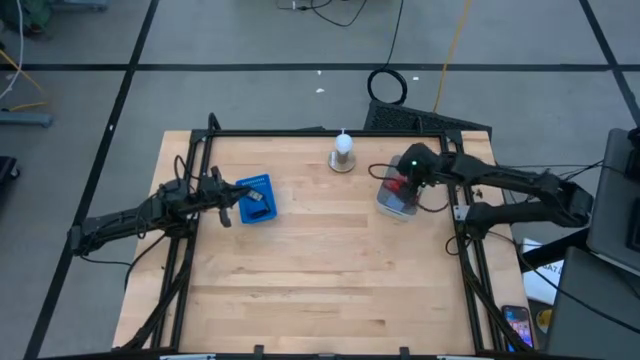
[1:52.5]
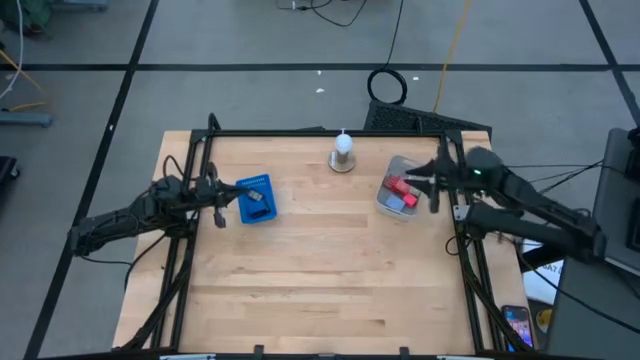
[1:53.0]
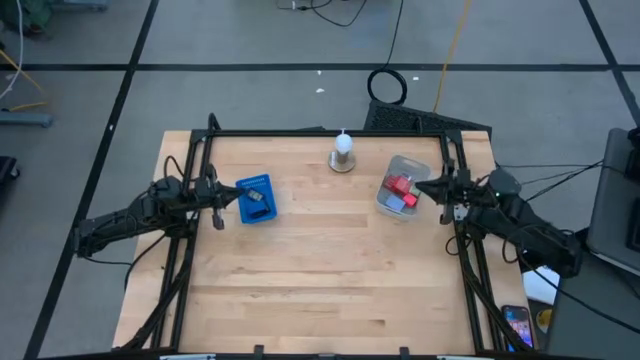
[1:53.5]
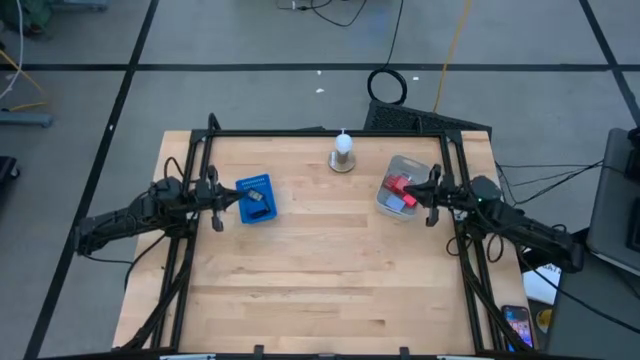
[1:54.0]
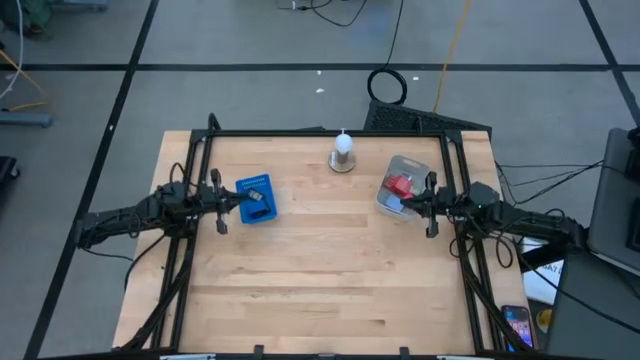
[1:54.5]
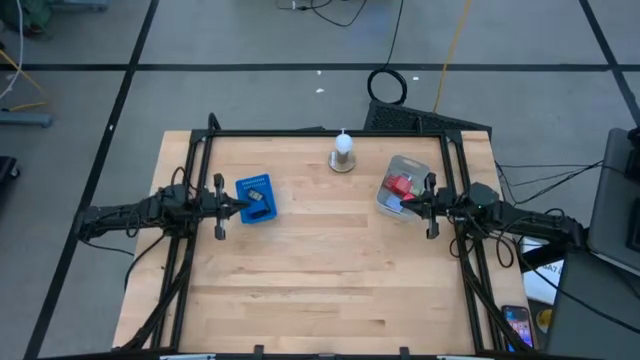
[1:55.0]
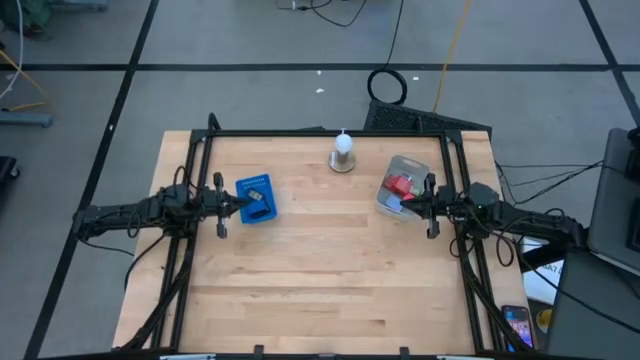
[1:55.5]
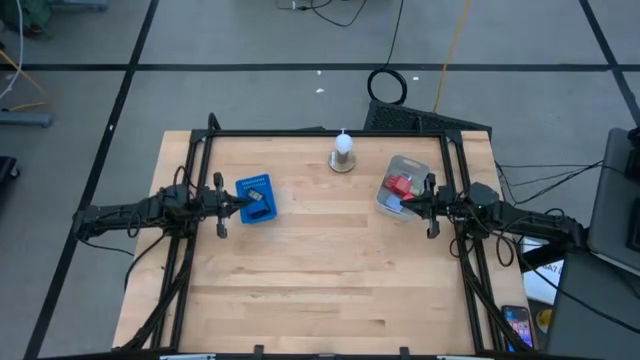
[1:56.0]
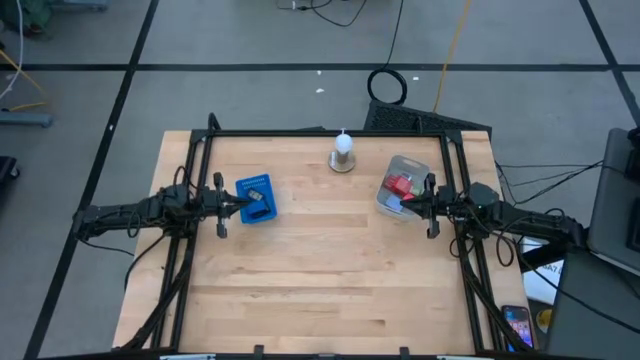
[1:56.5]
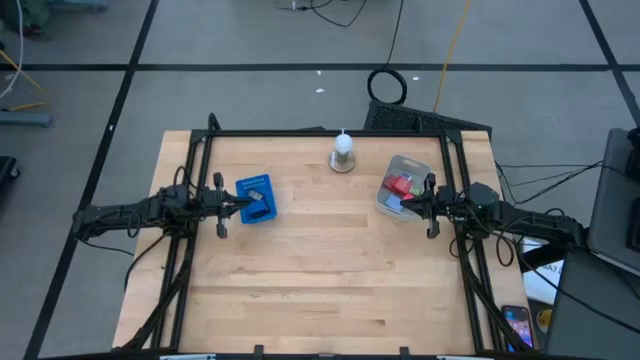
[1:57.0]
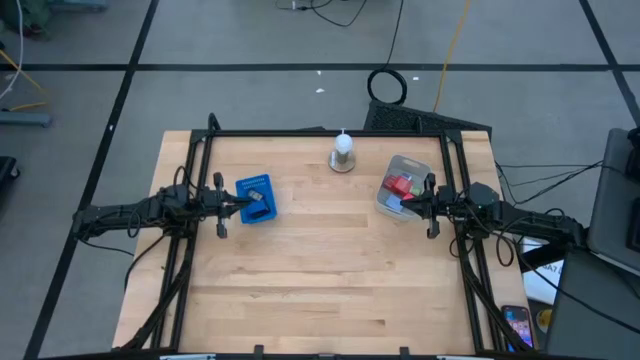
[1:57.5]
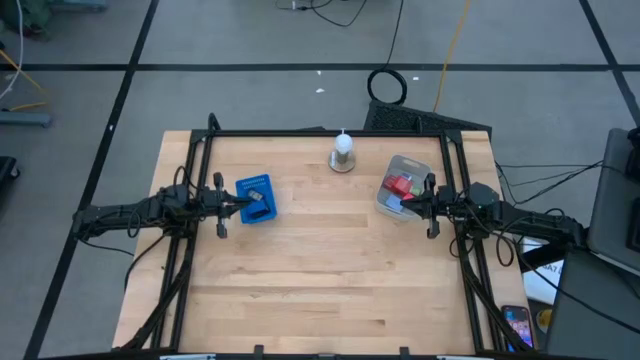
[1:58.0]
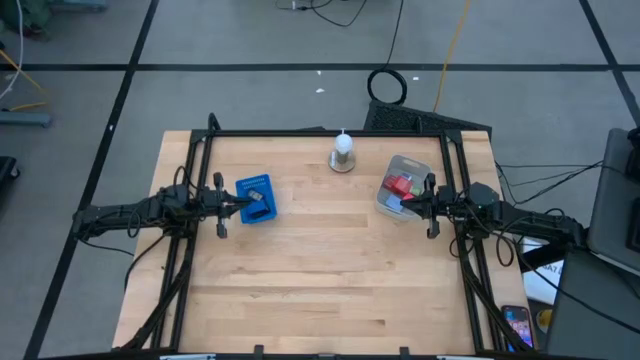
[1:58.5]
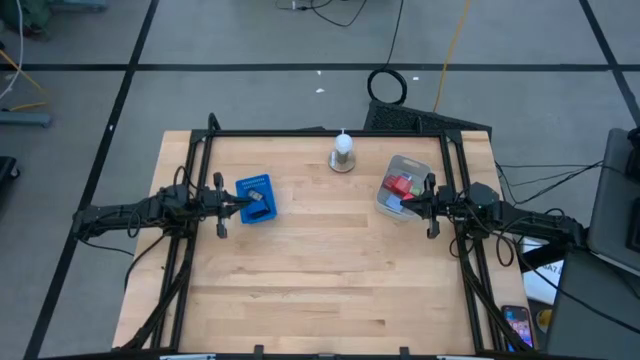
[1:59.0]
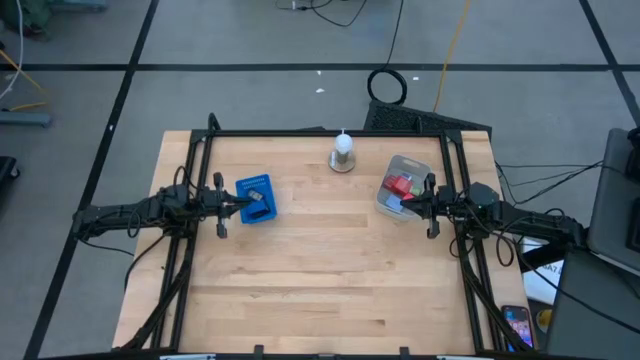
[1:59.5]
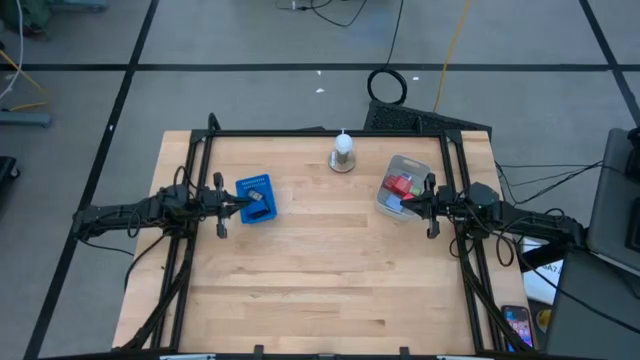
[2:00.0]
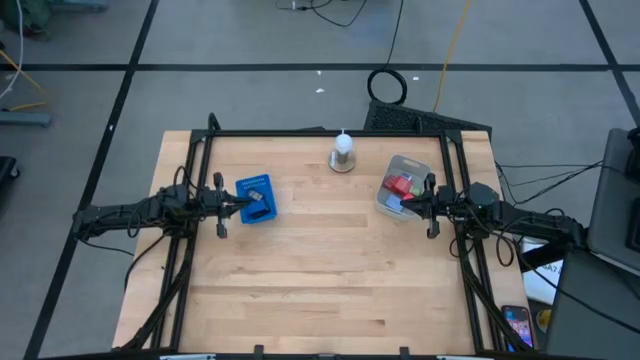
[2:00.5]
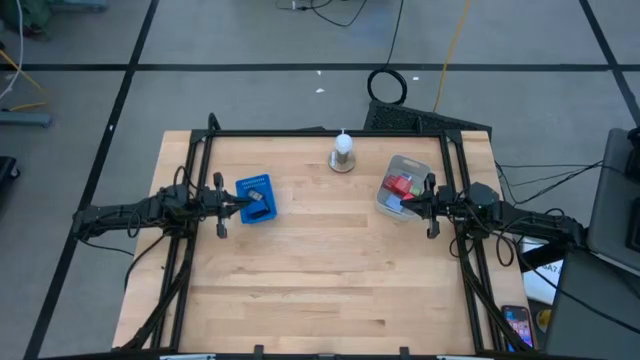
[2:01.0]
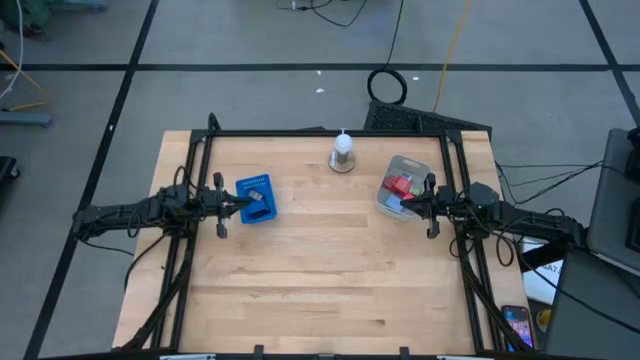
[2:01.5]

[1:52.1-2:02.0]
Task: Pick & Place Office items
Return to Home Position

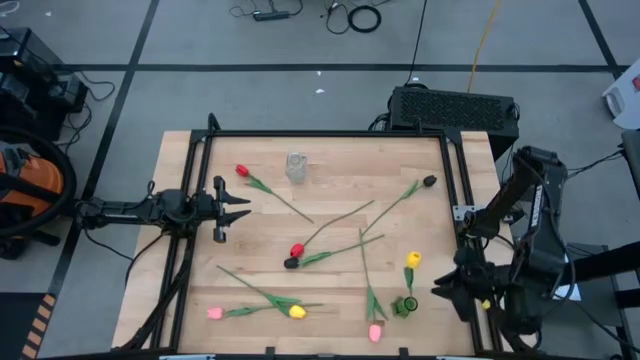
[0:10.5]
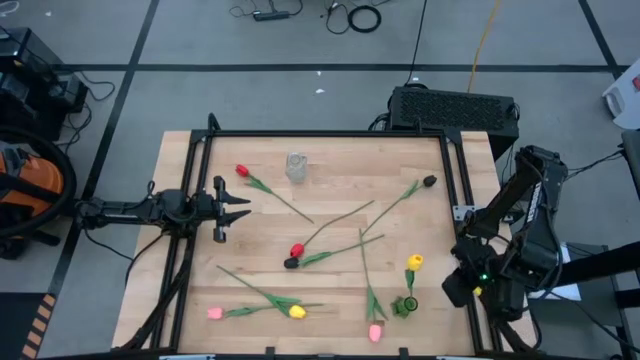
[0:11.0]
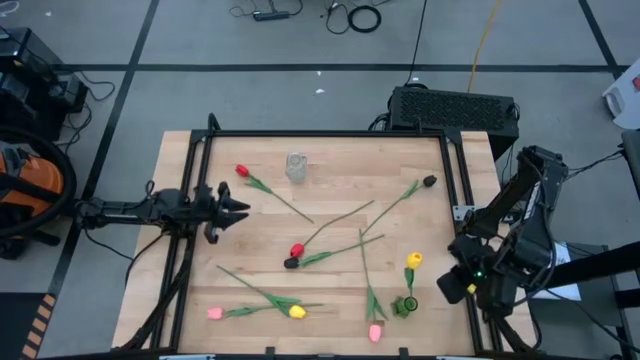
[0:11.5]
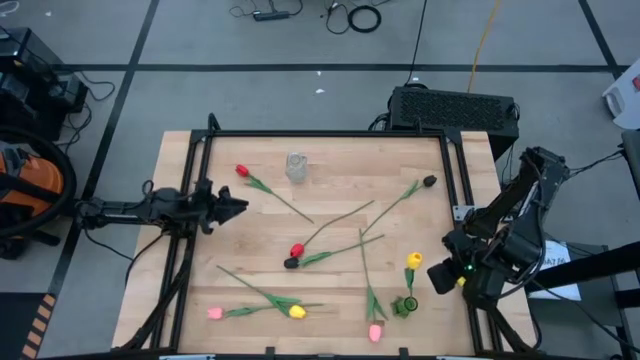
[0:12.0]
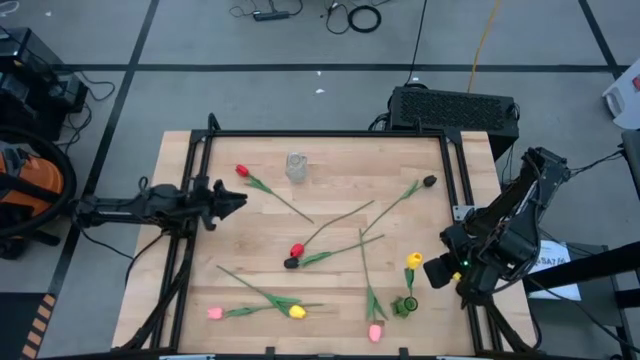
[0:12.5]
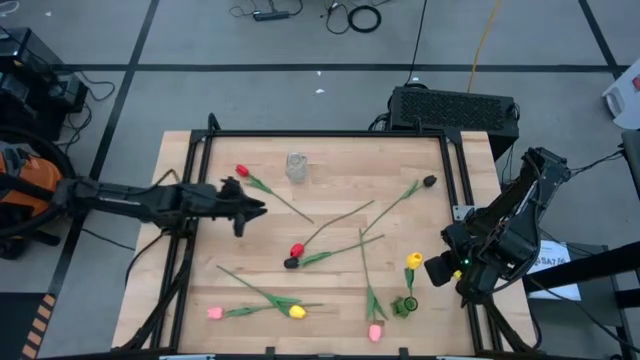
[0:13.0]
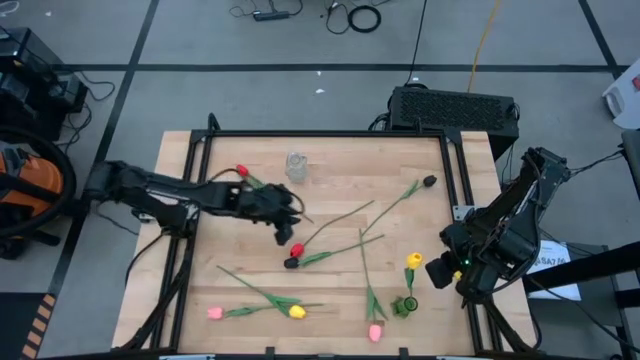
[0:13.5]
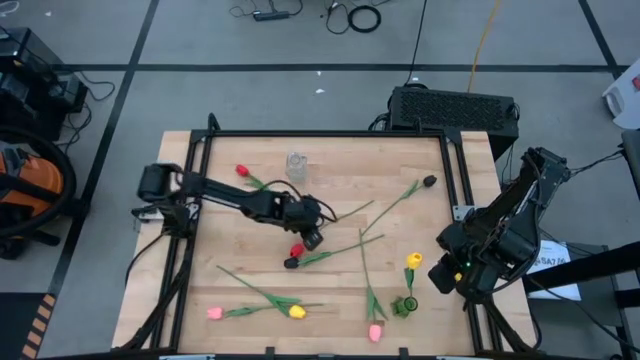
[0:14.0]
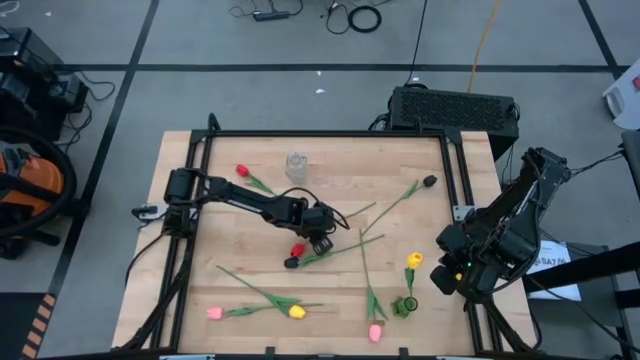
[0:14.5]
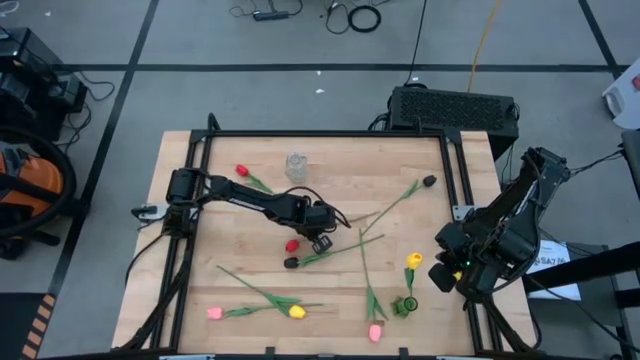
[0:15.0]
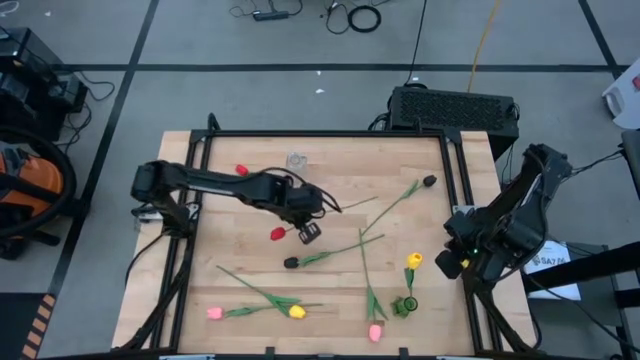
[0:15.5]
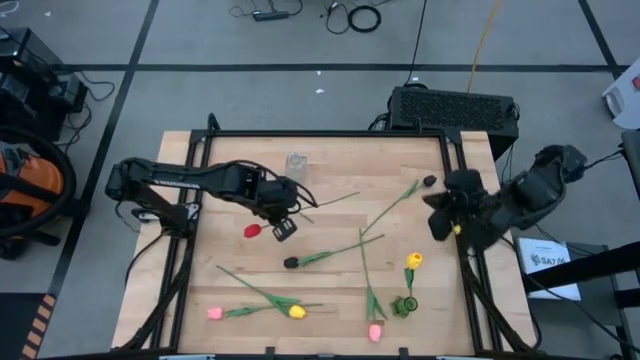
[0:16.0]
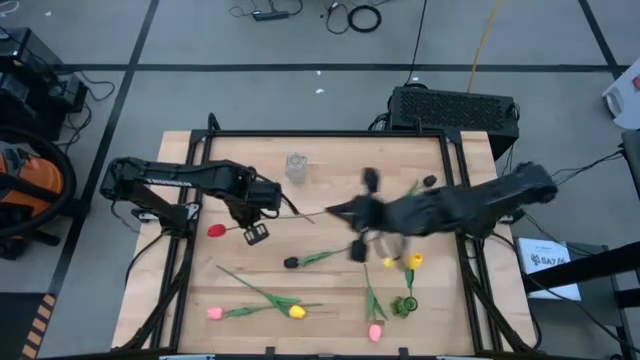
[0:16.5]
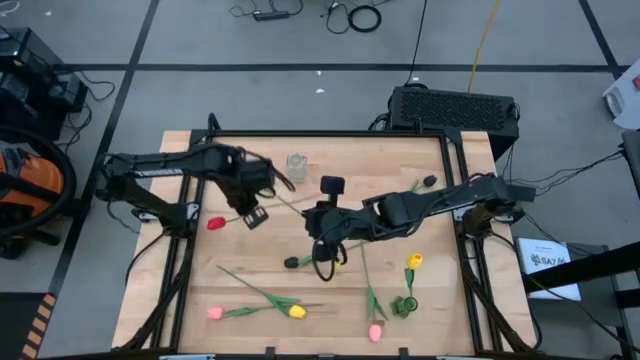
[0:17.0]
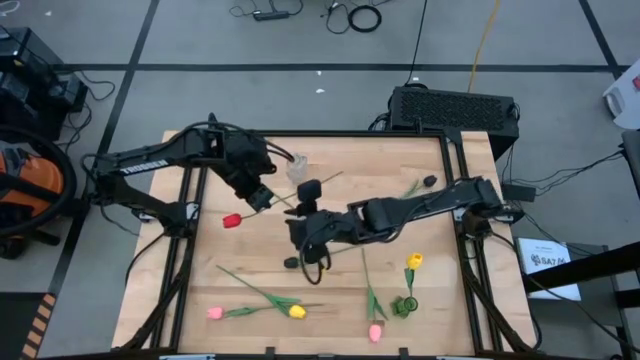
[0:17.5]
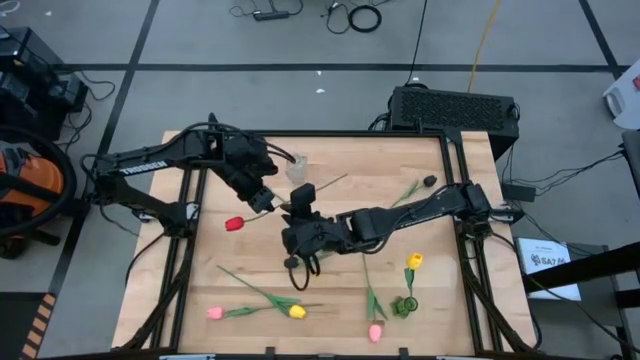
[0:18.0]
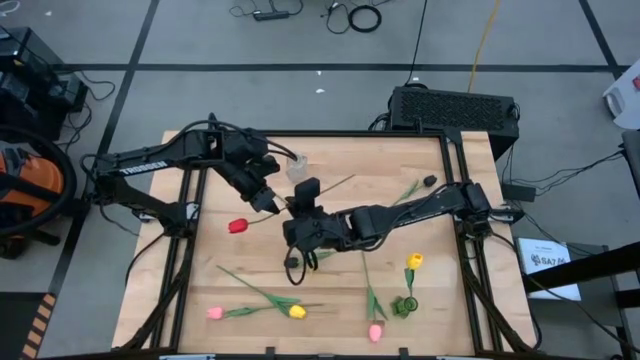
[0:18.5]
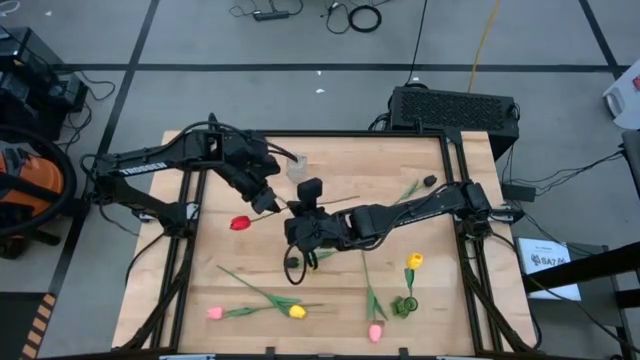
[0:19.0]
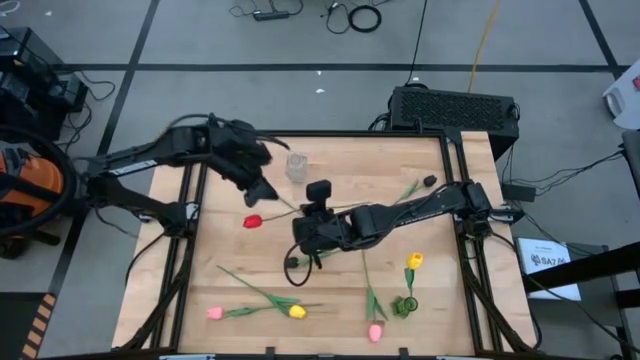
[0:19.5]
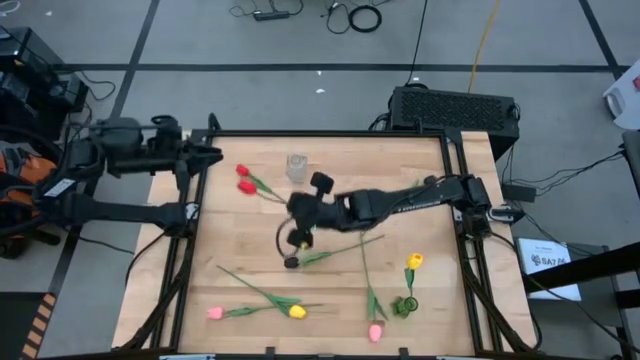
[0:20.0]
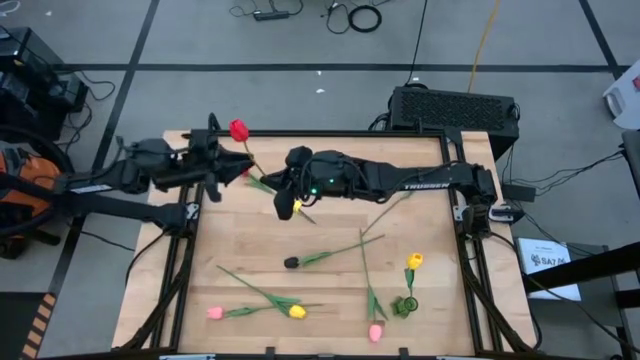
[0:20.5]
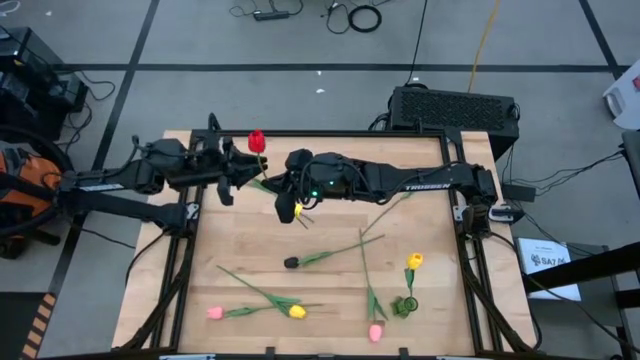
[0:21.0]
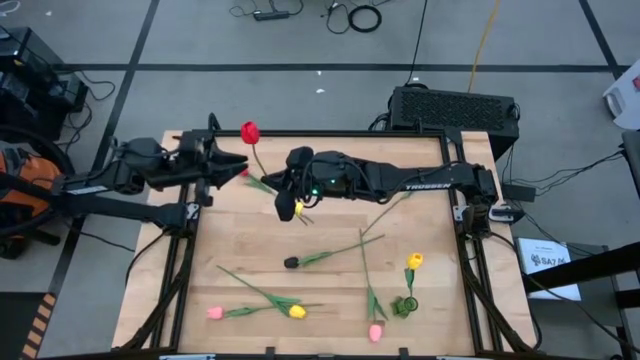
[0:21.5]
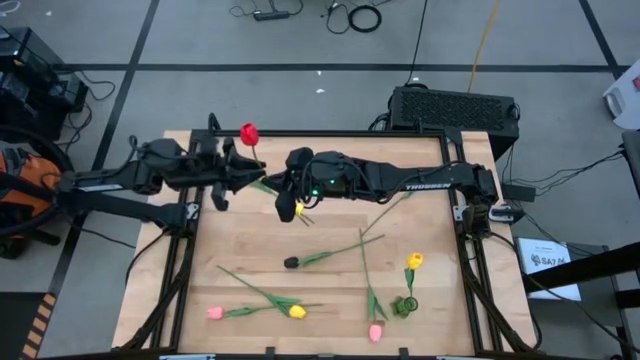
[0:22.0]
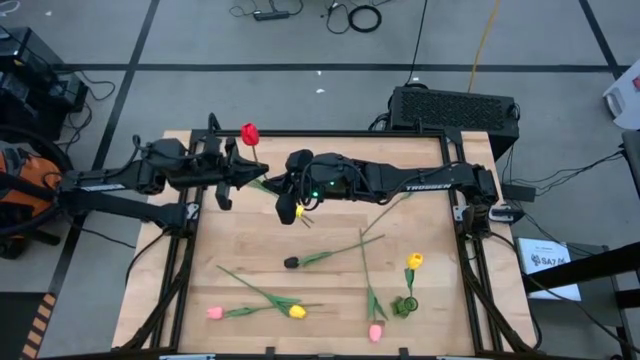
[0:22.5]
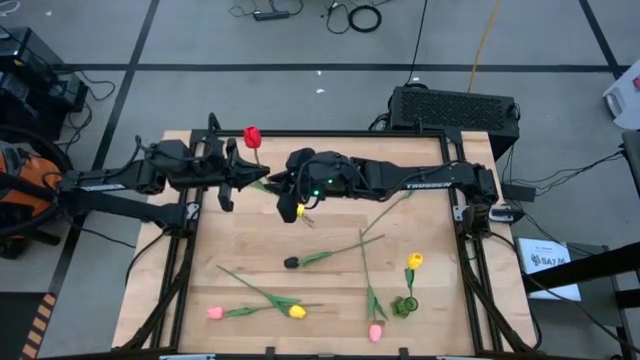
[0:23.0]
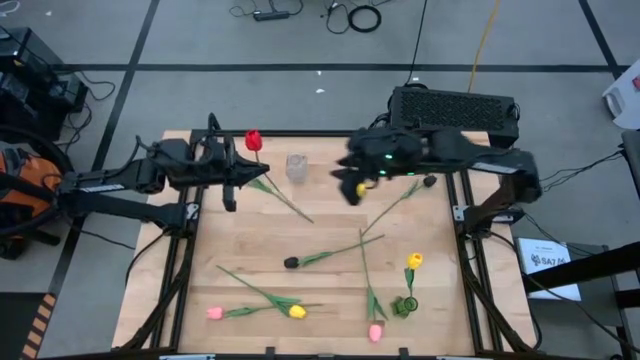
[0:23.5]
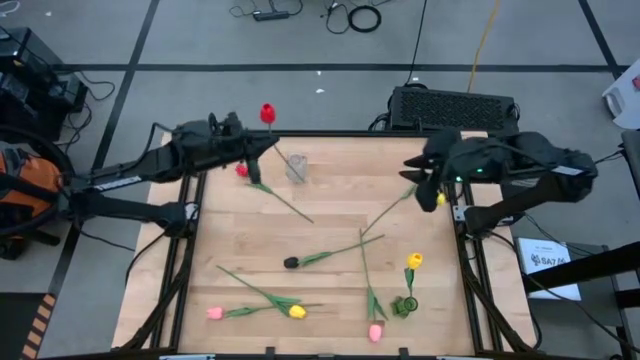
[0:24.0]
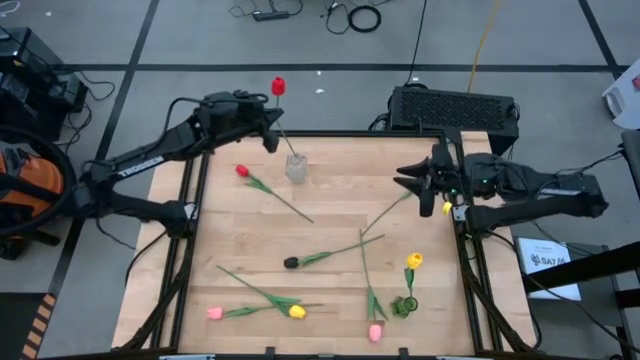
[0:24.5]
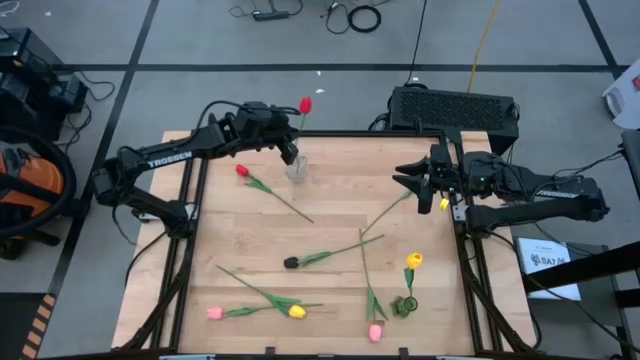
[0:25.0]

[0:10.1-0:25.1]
Task: Sort flowers into vase by color
Put the bottom red tulip into the transparent vase
